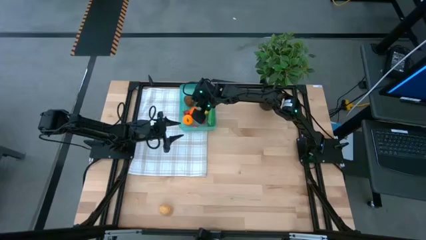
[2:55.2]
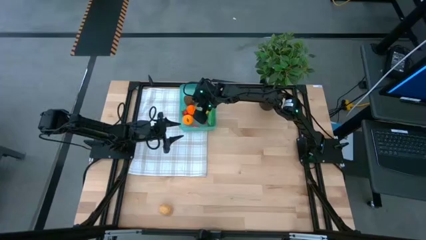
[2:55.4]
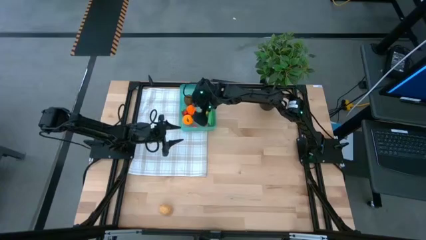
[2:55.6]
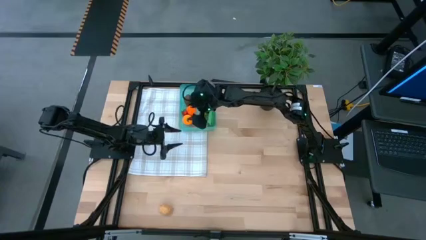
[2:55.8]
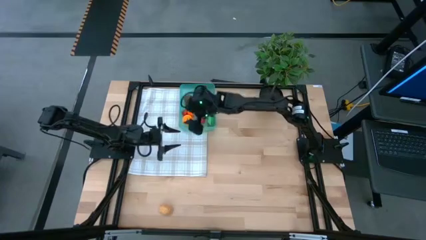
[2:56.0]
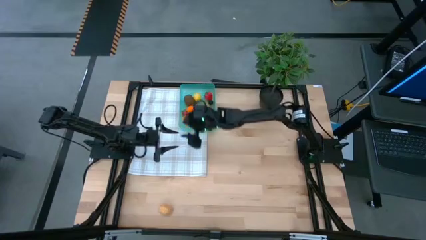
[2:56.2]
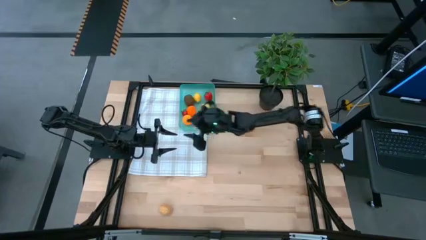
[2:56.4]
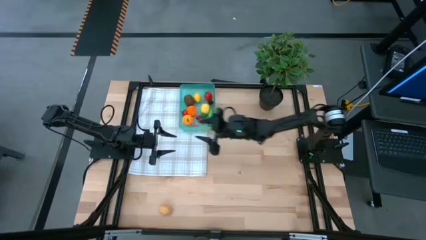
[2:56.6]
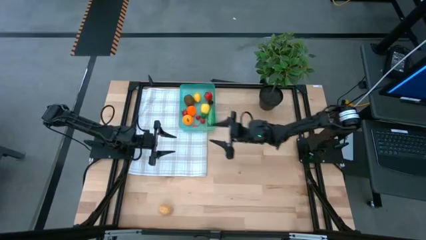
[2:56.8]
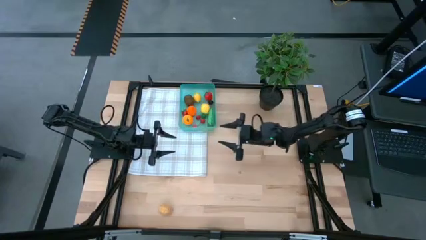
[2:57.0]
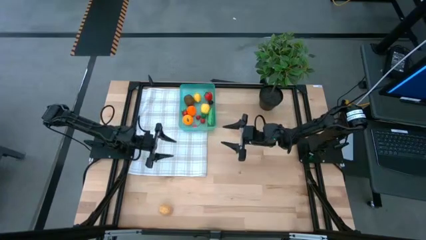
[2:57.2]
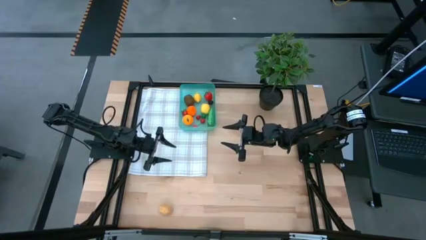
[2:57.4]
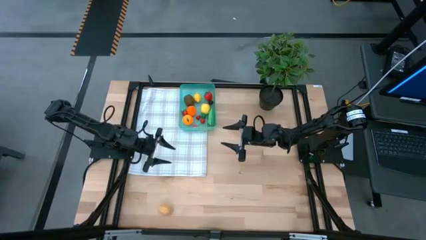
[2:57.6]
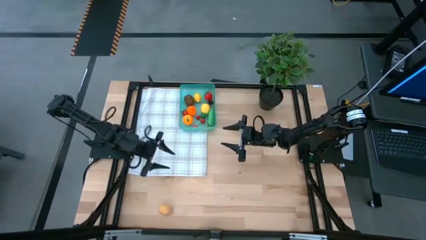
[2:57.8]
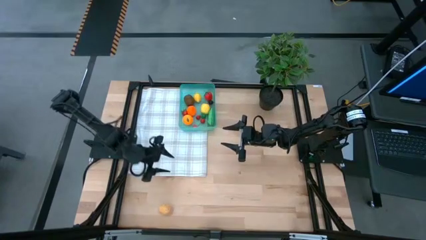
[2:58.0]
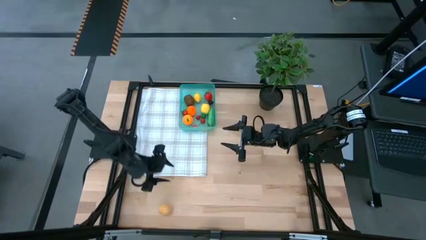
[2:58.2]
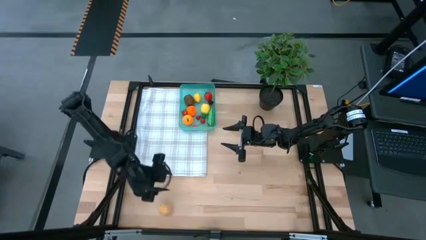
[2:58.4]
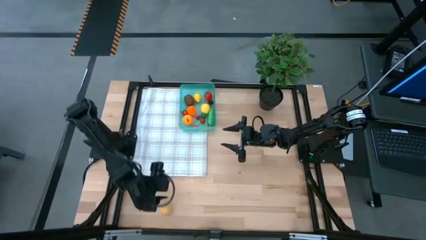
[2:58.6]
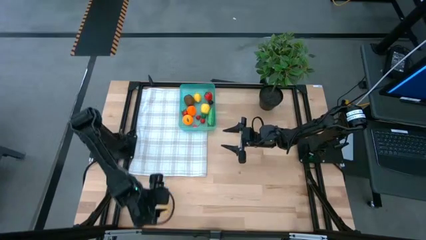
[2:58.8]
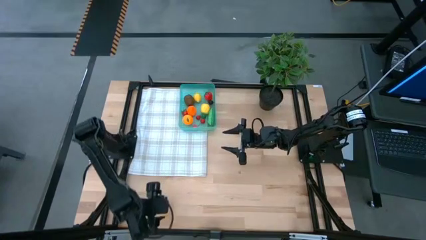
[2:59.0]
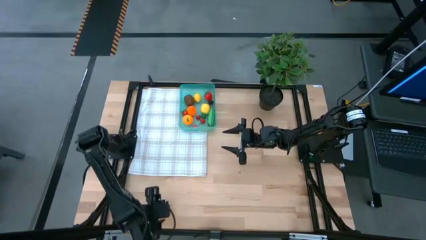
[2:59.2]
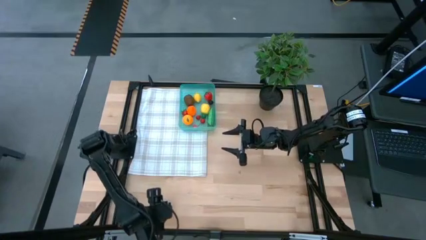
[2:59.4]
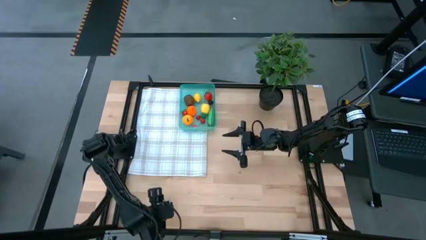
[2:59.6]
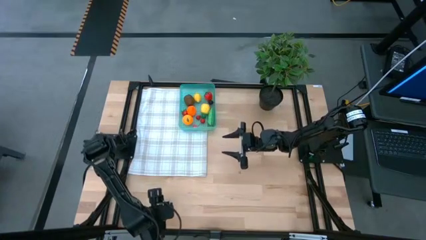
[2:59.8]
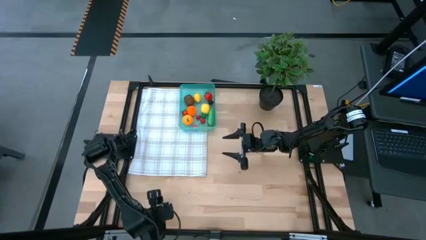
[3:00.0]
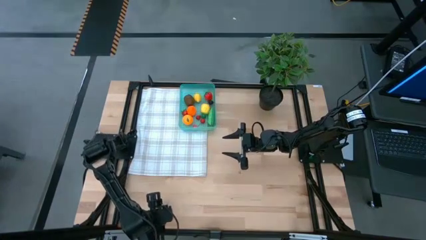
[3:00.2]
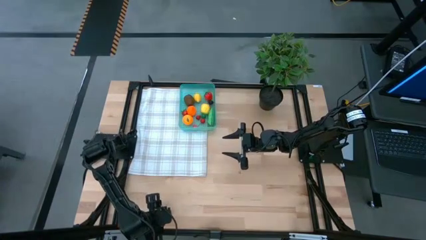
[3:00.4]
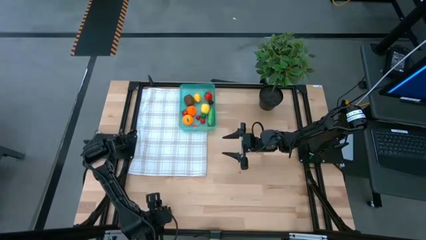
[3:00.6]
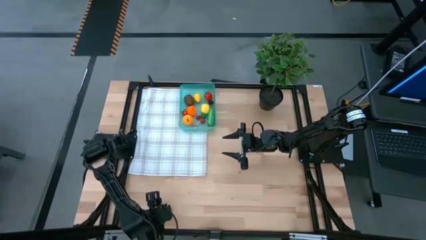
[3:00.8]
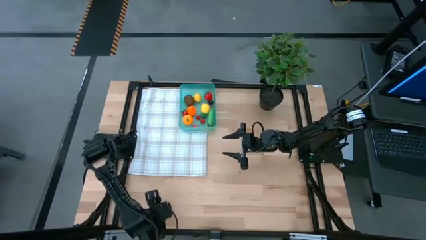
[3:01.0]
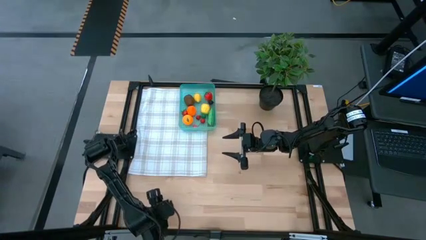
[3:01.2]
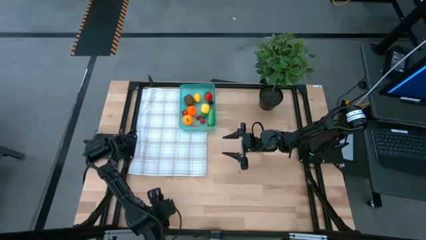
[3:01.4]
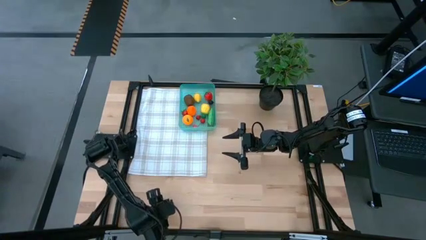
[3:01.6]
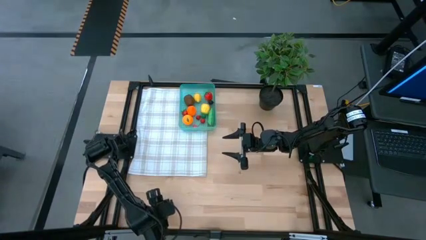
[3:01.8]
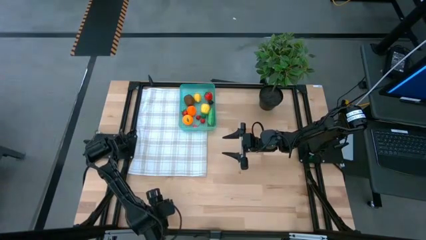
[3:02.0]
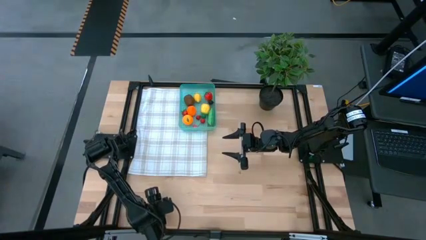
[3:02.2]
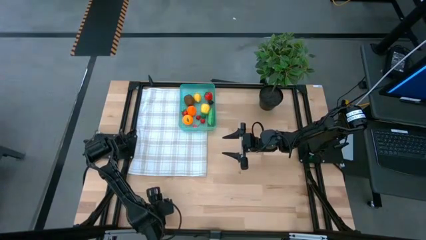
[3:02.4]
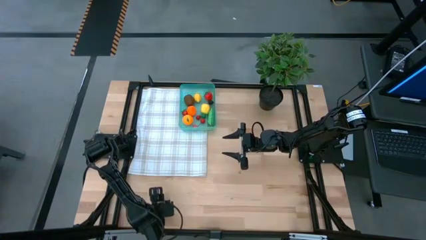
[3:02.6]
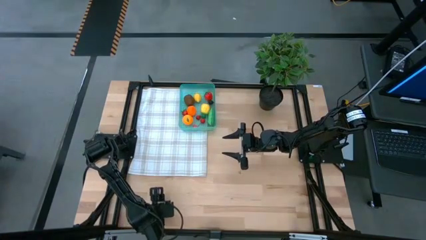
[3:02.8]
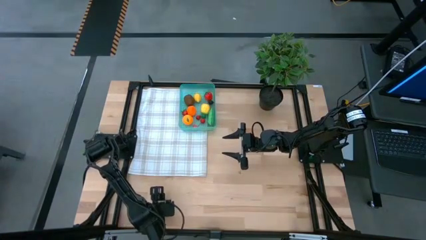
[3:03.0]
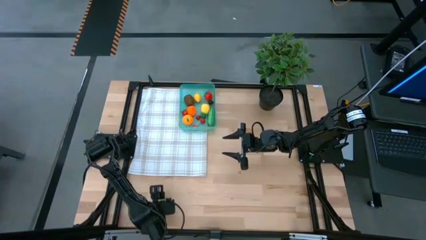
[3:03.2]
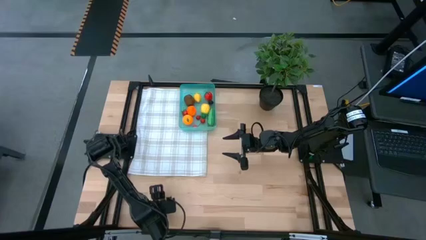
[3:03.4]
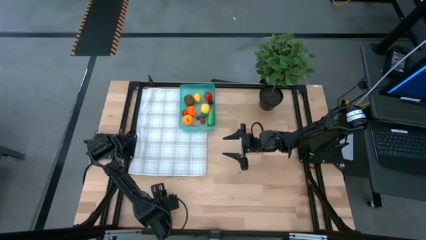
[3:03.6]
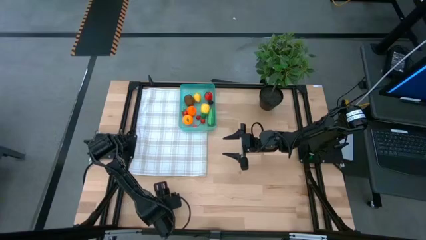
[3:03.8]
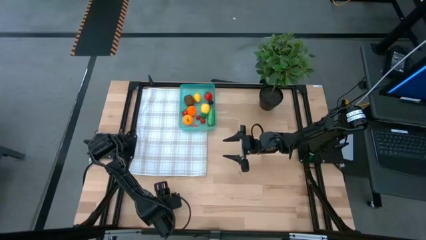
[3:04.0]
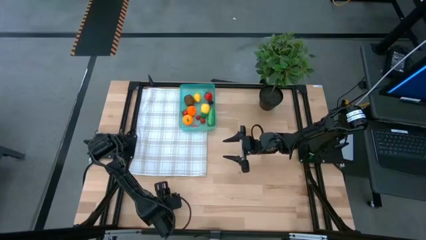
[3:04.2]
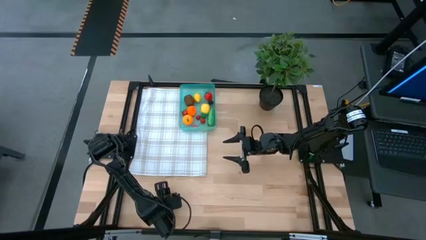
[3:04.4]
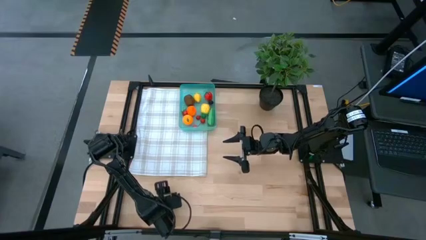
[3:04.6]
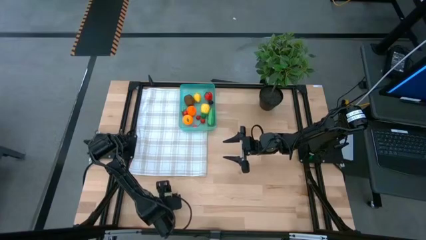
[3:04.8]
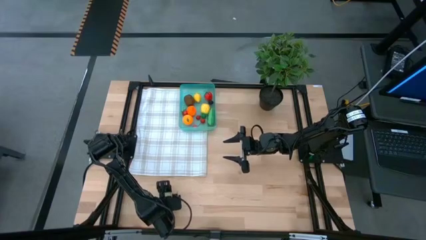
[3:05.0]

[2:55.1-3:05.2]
Task: Pick and placing Produce into tupperware
Put the brown potato into the blue bin

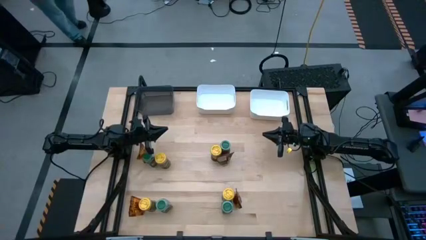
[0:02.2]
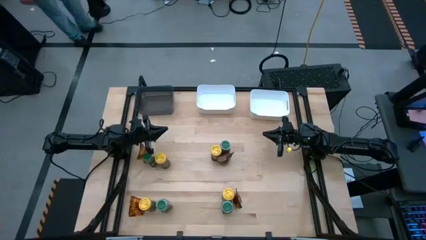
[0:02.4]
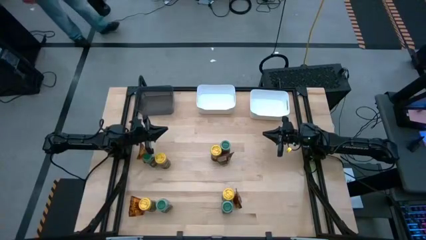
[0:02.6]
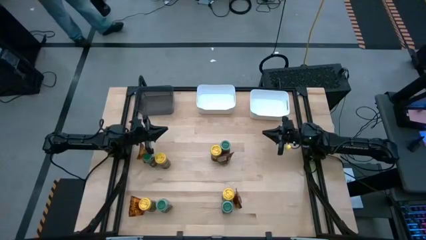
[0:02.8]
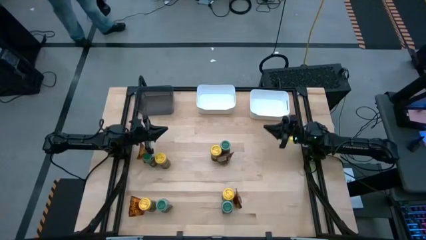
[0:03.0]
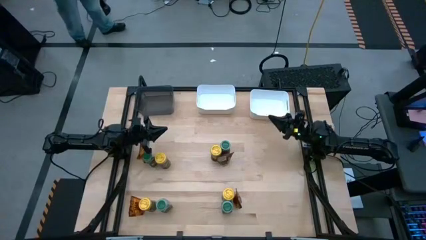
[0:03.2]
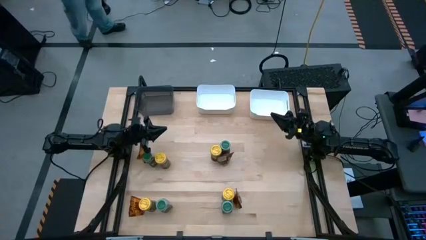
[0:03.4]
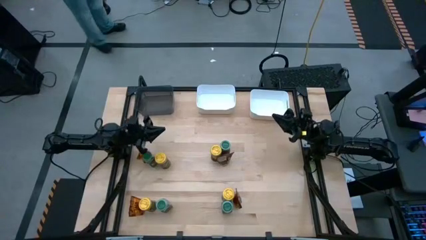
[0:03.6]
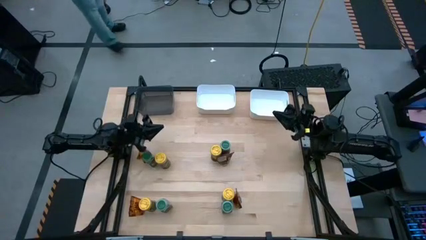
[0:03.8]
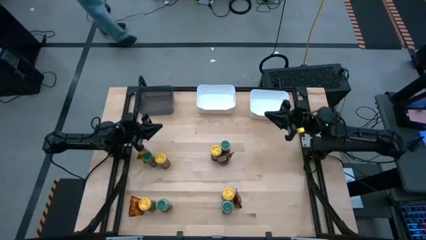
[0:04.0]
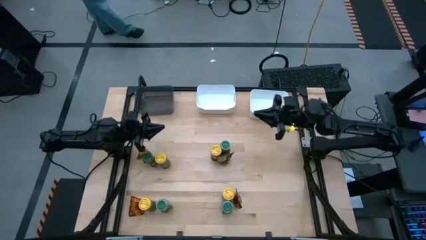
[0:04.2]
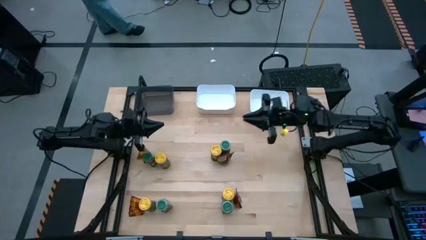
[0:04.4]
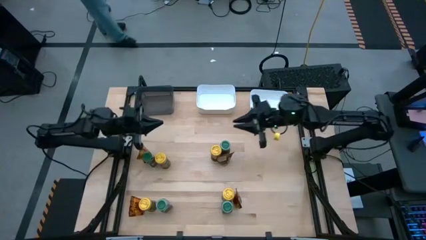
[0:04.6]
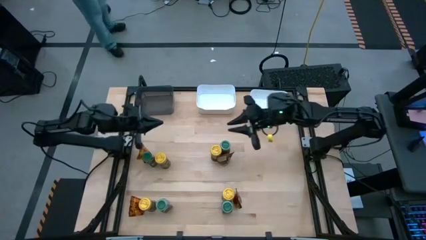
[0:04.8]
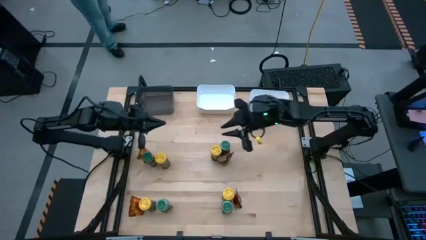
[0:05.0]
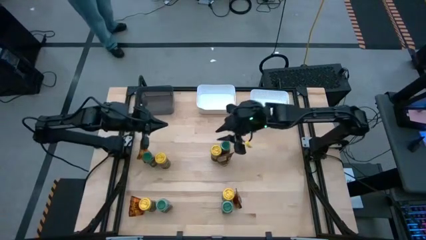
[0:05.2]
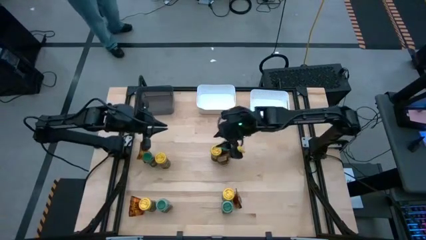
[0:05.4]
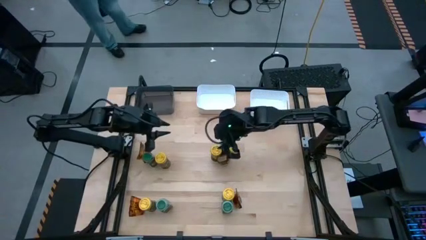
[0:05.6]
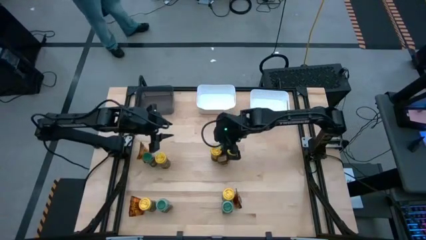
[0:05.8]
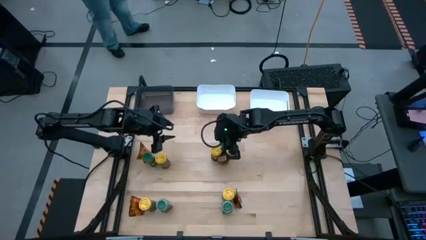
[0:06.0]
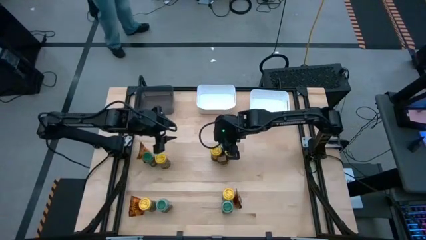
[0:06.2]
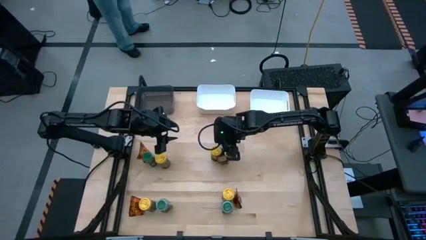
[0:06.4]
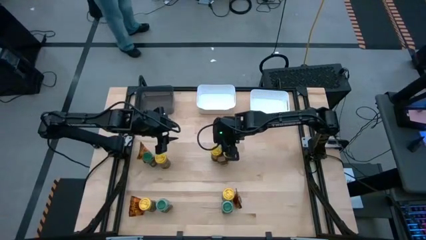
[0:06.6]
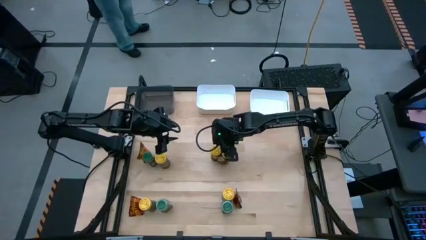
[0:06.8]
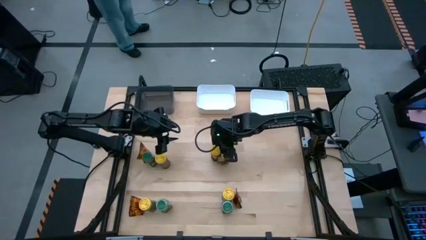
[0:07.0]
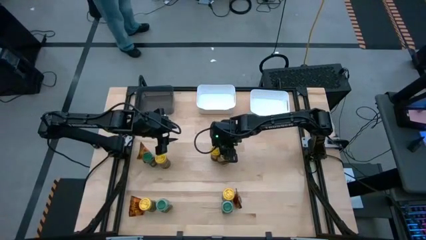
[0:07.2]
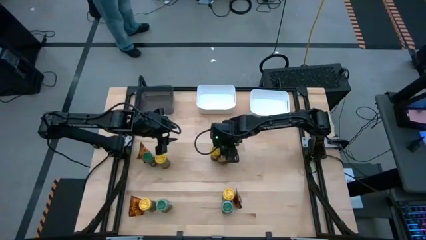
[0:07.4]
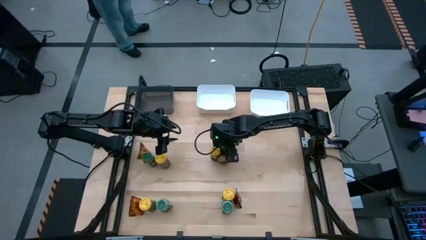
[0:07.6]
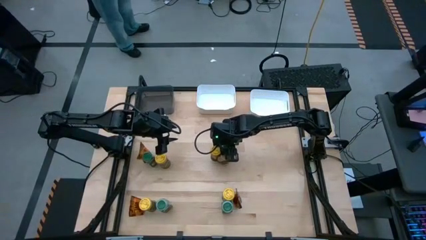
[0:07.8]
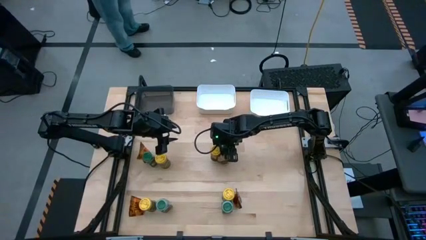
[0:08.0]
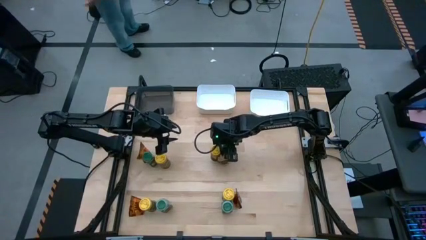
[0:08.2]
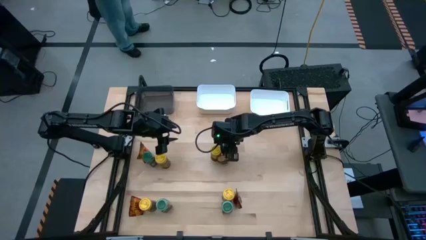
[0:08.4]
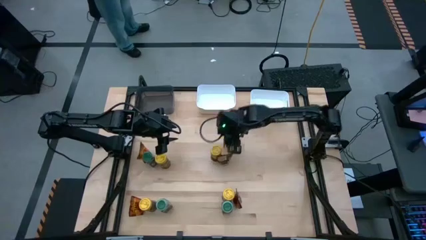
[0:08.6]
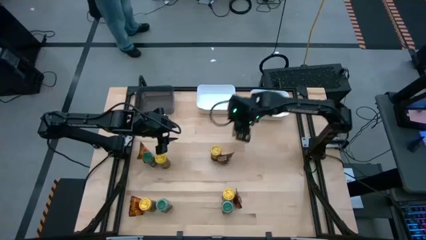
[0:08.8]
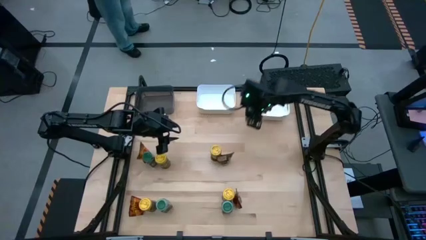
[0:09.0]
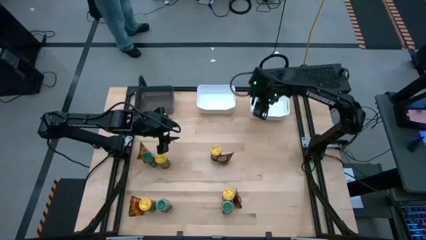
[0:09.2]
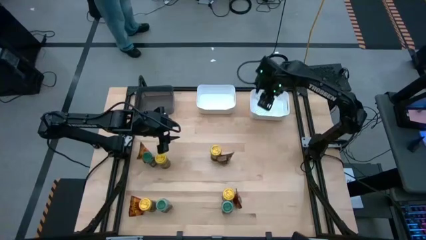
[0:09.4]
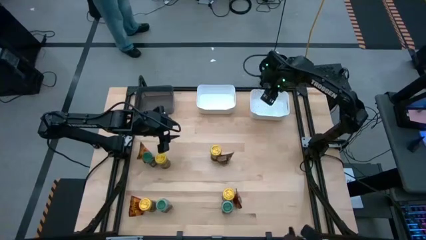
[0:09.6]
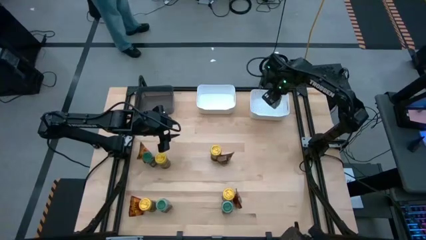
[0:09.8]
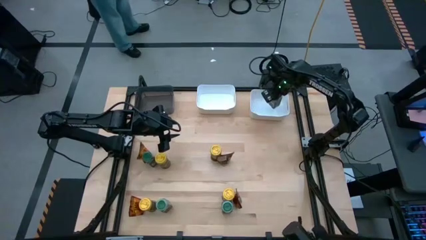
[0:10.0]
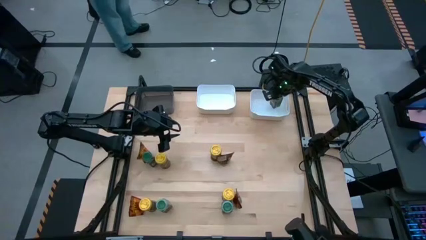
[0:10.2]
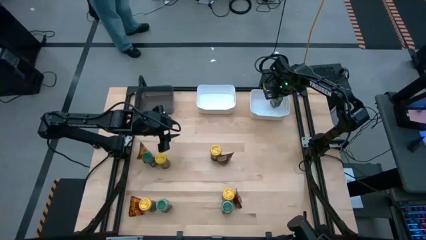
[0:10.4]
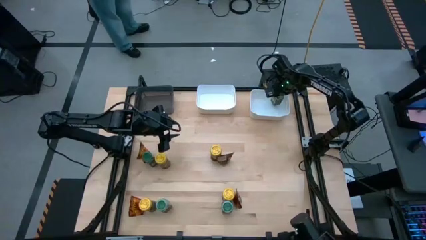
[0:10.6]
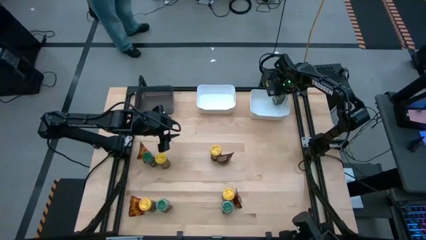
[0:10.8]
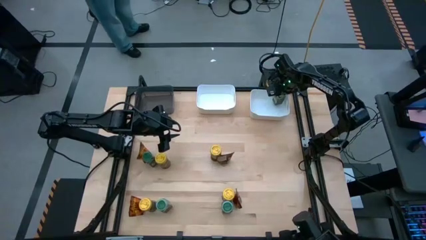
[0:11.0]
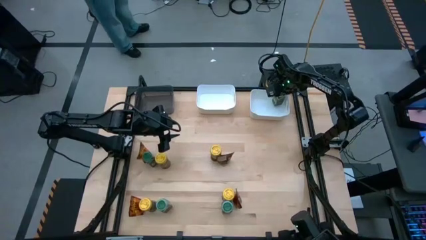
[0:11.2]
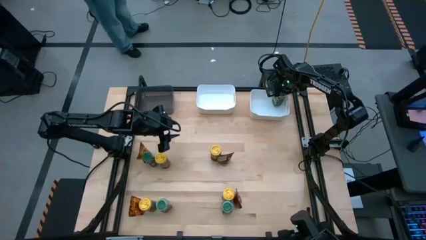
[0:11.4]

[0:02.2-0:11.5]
Task: Sort spices by type
Put the top right green seasoning bottle into the right white bin
